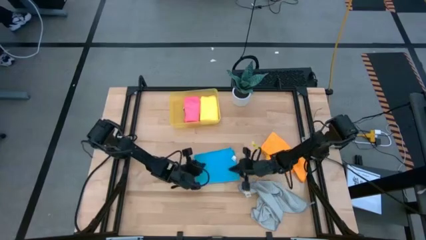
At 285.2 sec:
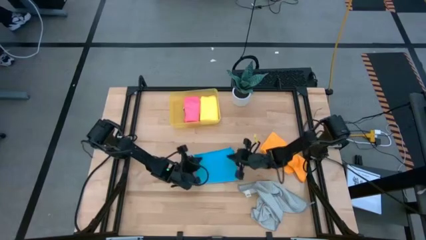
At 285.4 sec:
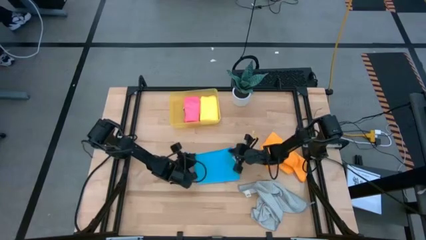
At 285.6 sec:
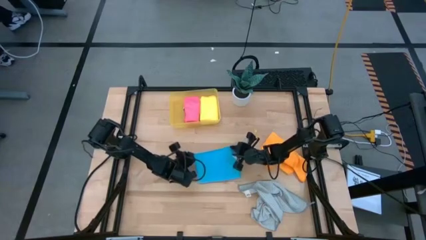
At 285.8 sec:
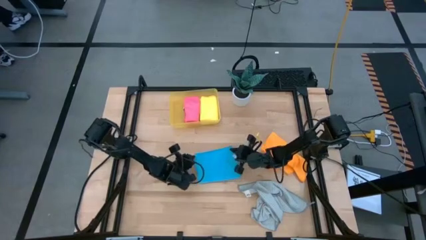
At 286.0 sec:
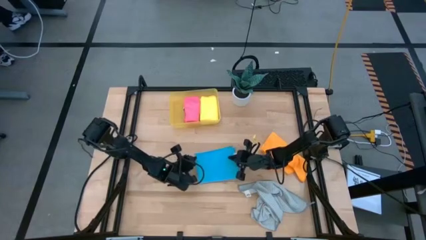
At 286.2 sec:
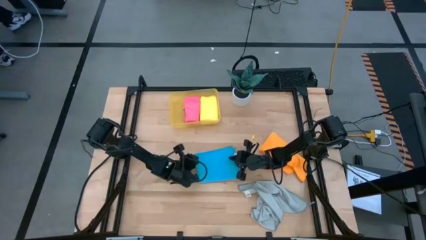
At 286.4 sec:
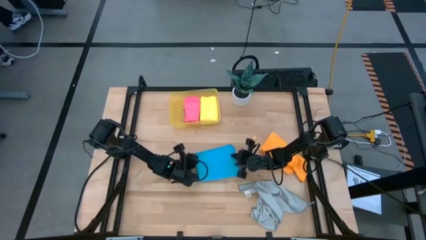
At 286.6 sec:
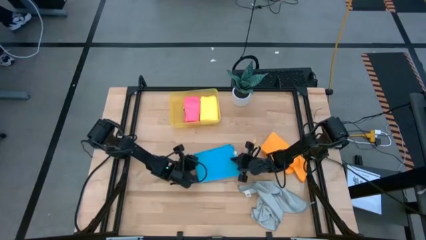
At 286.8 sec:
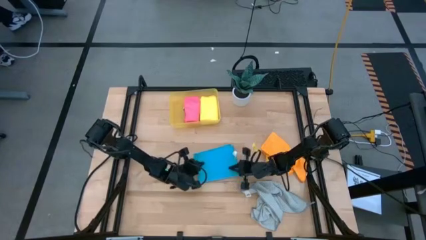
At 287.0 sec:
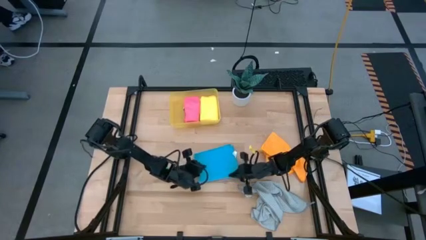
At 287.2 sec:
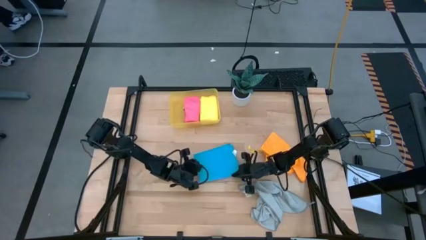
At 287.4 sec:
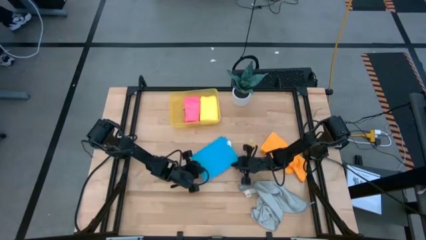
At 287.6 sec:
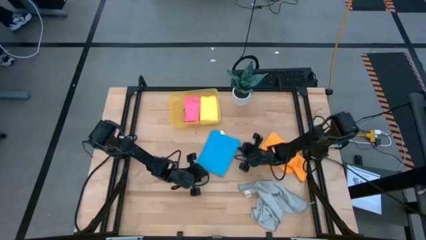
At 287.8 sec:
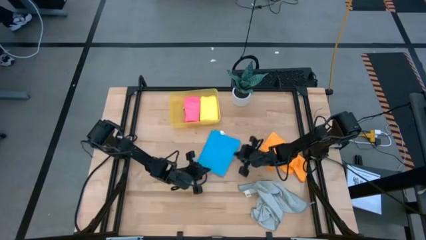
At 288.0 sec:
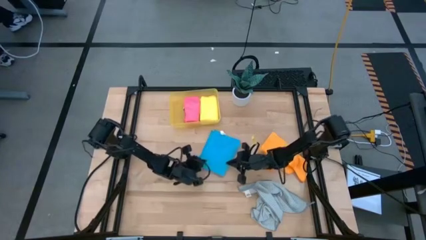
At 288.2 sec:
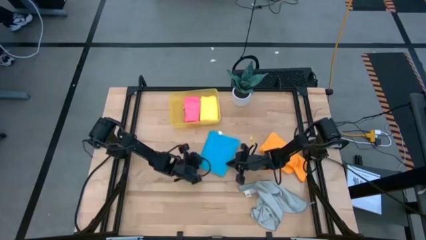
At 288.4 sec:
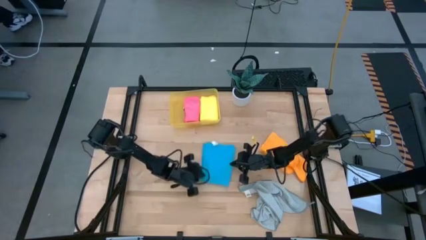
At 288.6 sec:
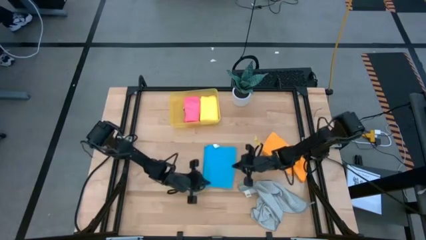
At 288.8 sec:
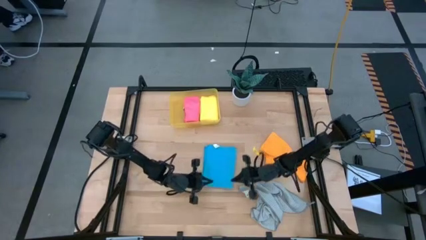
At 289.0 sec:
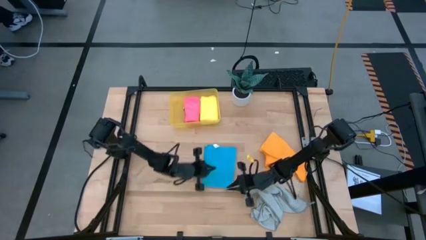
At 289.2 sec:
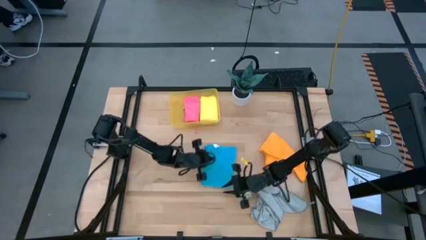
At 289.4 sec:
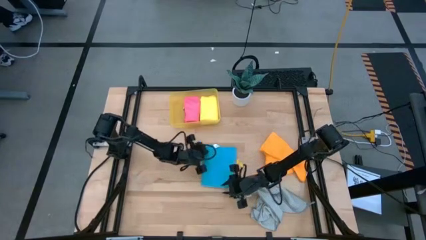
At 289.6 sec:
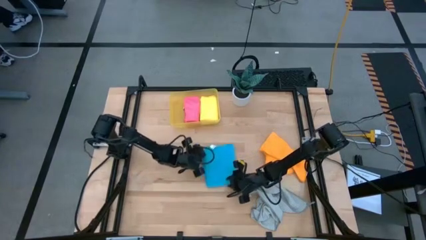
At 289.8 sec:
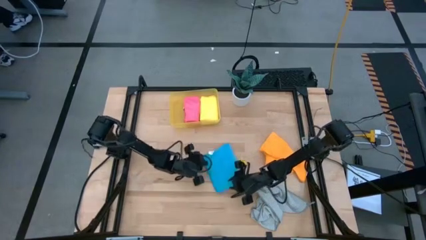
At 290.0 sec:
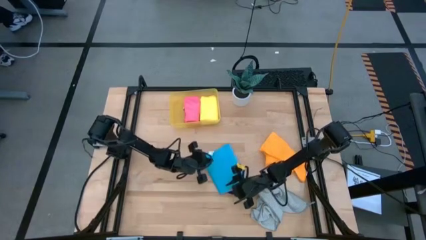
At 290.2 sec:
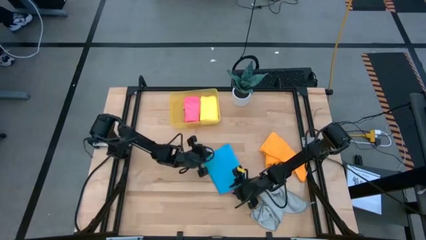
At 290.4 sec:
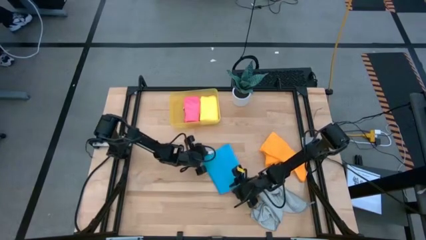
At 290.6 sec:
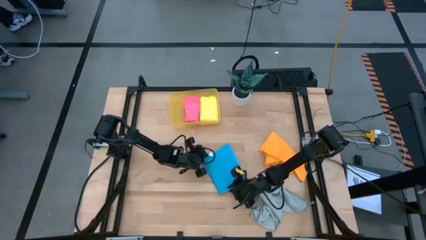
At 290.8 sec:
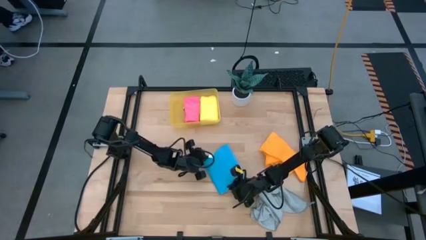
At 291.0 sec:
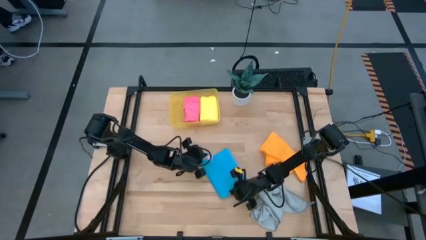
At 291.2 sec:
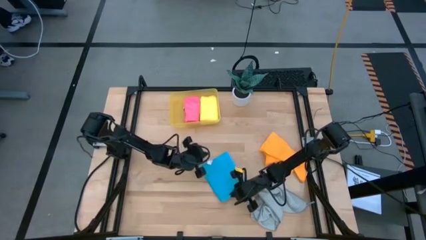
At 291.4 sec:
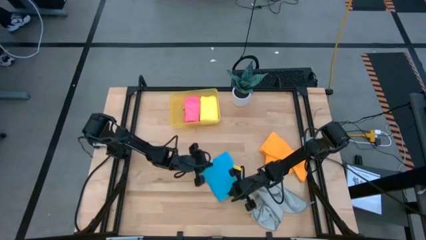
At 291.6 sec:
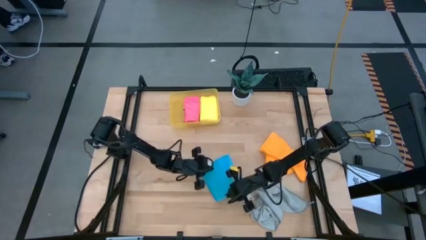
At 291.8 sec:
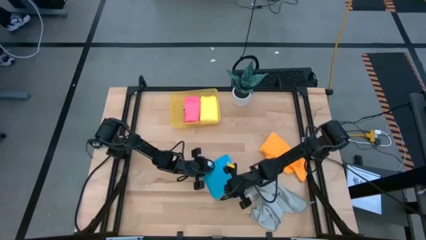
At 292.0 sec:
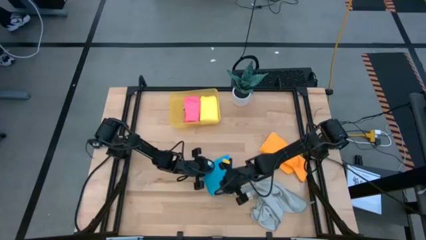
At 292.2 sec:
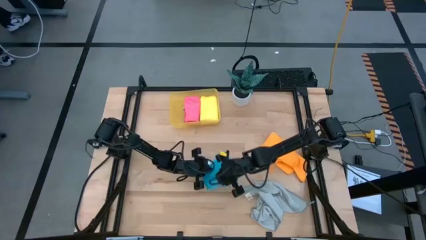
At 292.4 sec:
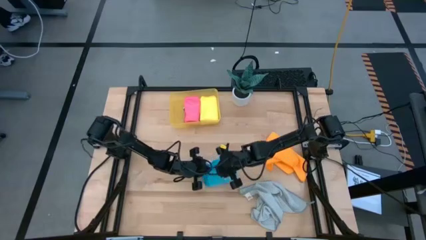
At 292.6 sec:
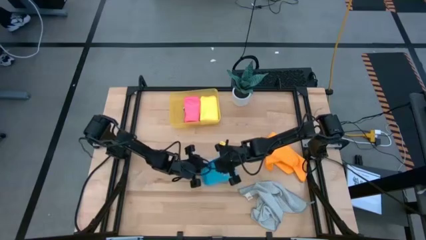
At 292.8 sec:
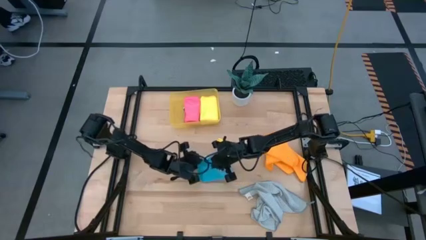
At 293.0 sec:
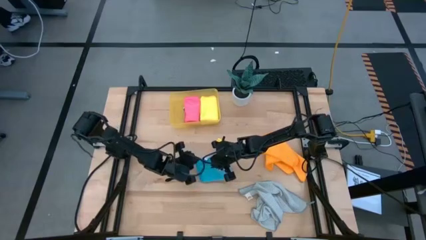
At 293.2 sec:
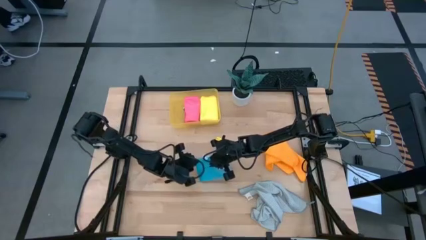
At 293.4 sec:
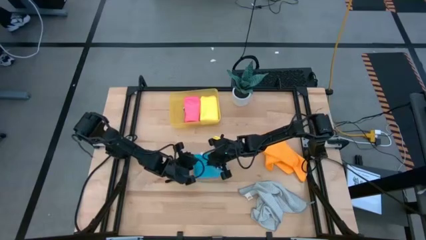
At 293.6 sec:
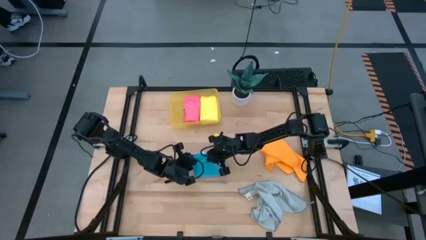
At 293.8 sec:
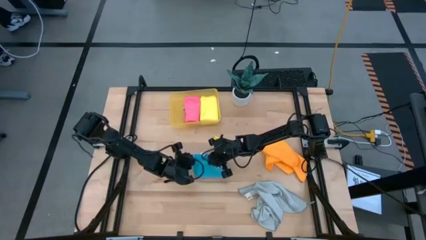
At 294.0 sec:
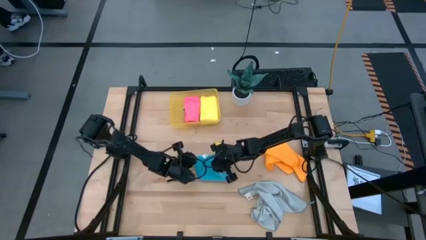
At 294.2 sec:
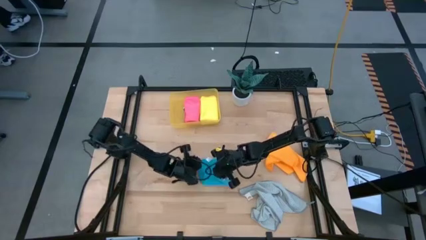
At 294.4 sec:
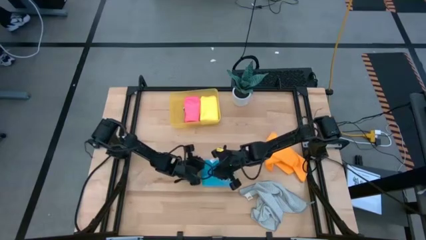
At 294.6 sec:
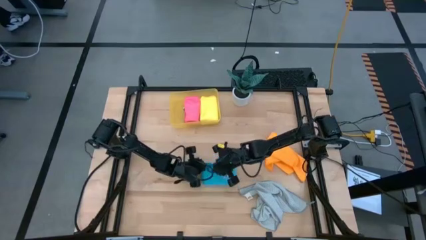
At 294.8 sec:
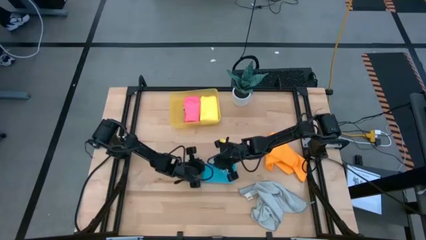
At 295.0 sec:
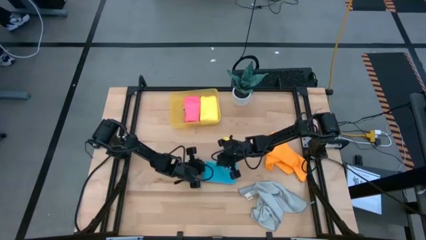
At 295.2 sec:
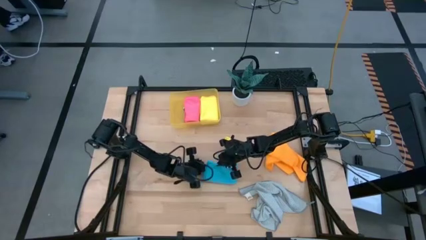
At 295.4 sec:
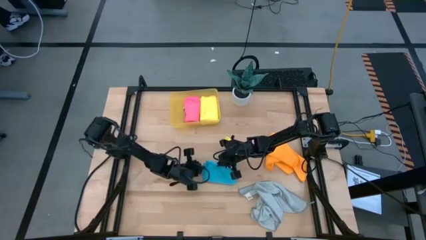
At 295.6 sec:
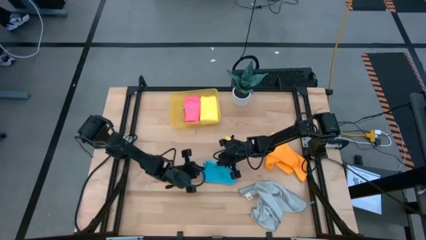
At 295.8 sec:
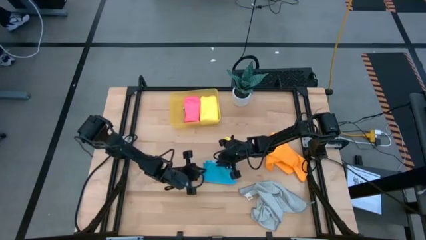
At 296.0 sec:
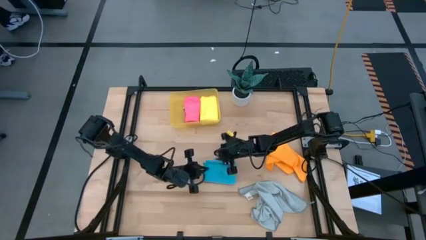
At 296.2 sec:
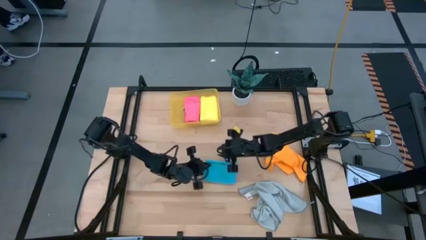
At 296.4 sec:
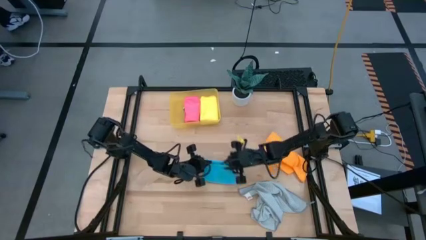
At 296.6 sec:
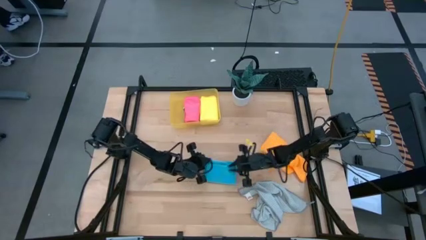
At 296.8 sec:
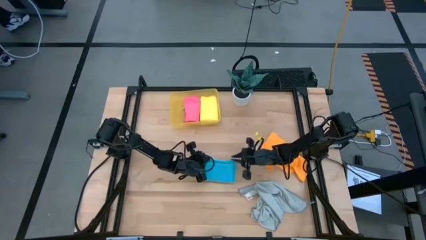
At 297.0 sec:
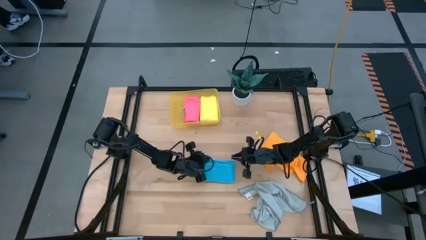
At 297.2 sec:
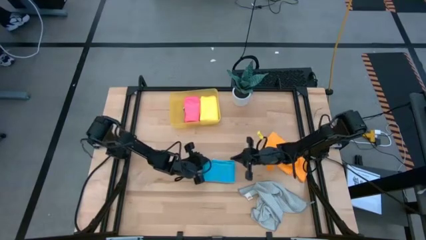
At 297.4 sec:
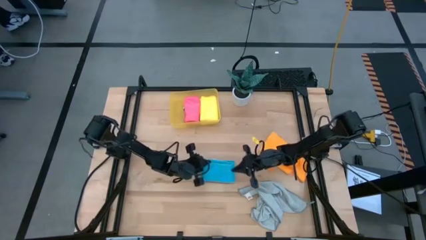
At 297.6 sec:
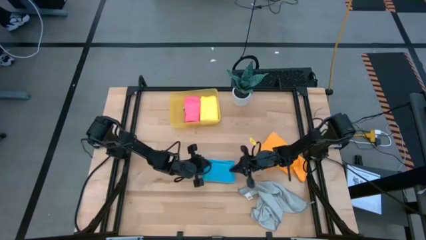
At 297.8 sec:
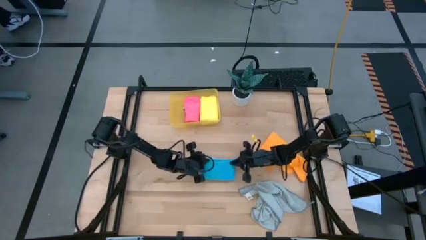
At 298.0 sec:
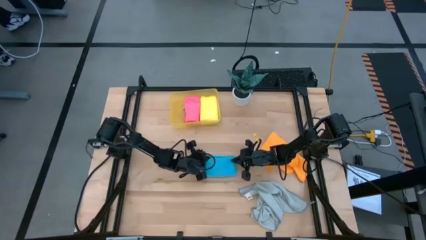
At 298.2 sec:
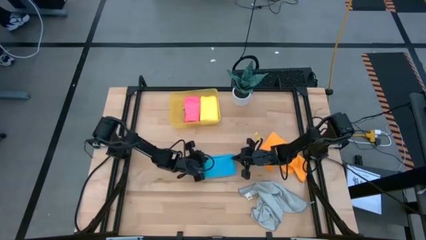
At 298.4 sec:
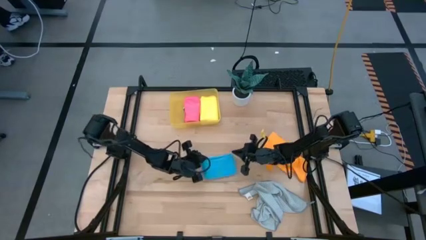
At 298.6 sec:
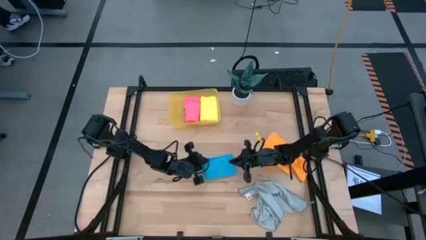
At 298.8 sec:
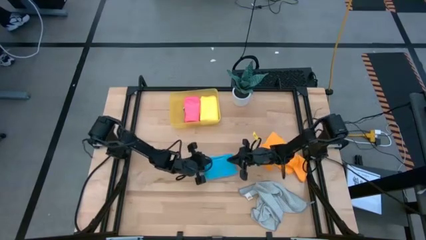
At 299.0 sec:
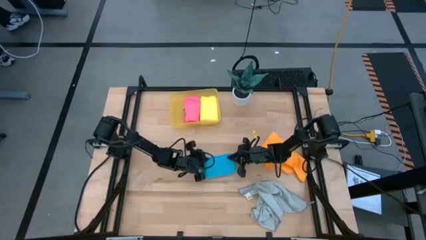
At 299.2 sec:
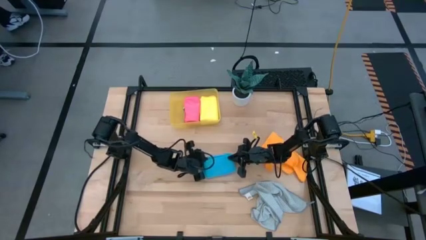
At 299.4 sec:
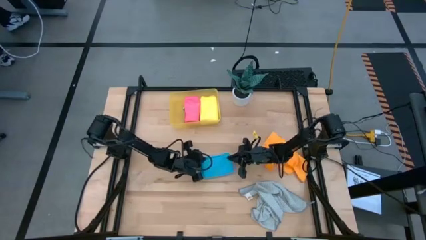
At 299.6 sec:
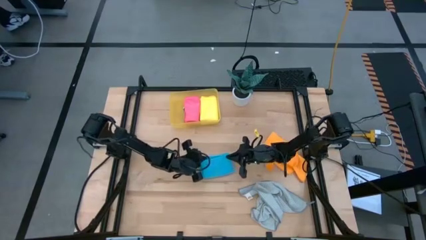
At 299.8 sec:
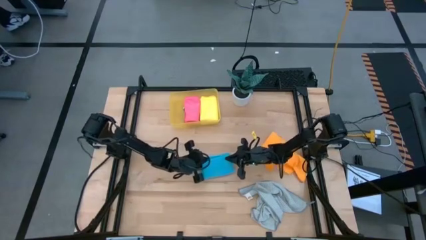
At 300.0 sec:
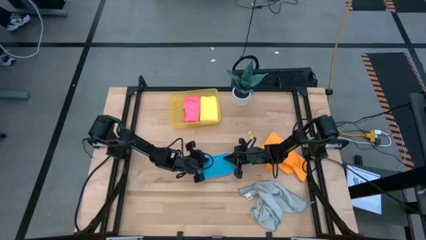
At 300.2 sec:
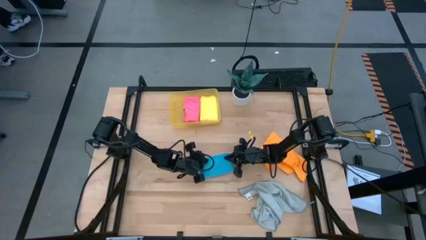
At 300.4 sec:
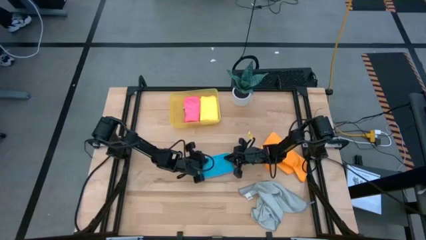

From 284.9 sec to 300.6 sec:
Task: Fold microfiber towels
Fold the blue microfiber cloth

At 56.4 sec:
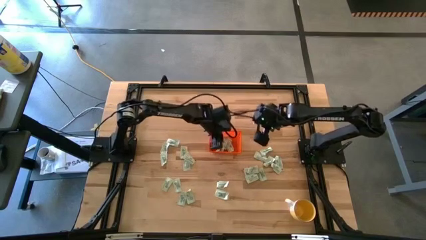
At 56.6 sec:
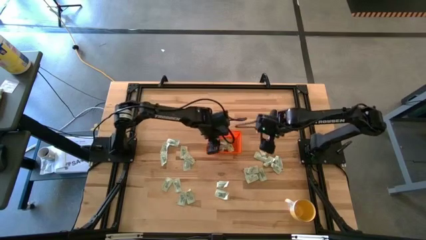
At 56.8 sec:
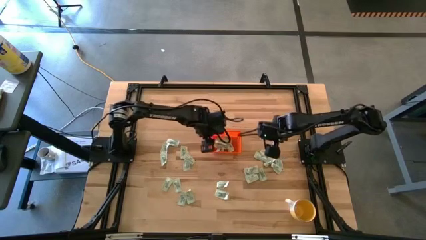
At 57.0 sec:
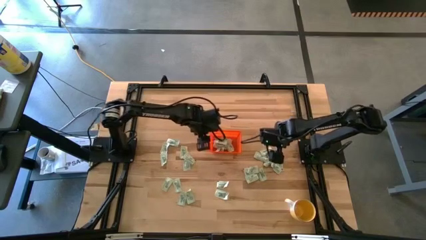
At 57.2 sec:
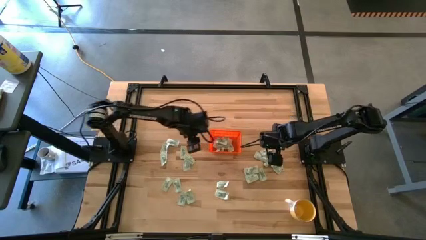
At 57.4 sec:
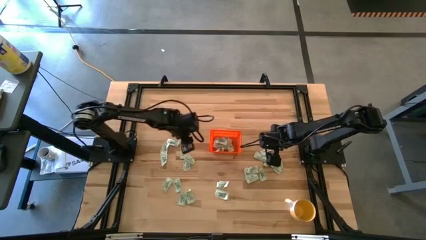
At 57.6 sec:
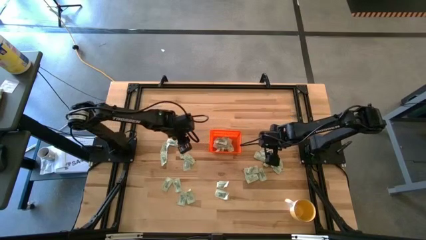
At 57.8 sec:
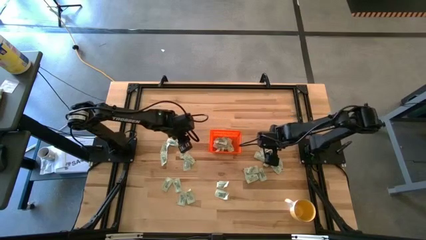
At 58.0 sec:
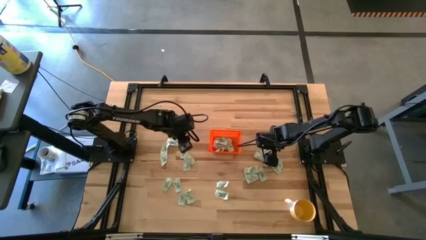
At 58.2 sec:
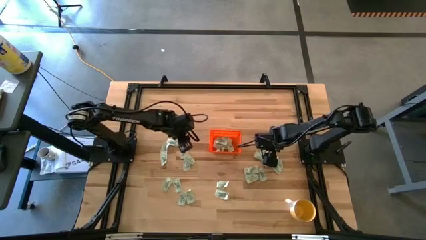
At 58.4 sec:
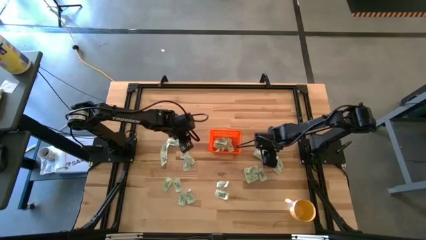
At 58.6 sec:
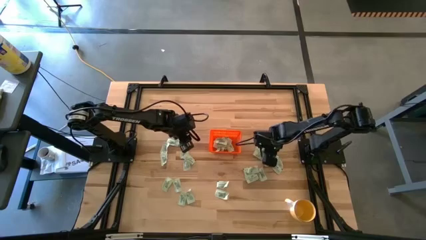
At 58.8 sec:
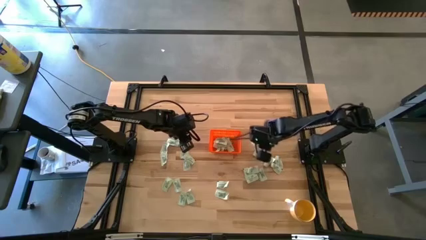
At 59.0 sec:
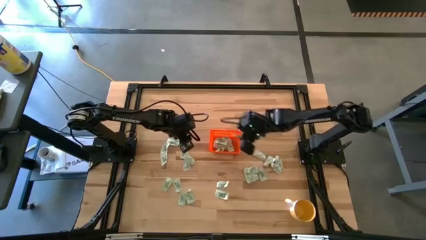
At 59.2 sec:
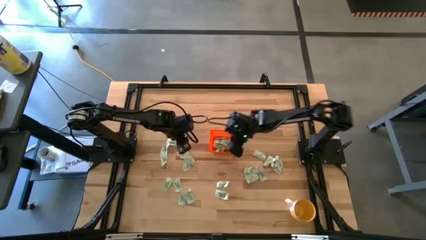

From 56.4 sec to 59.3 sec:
Task: Pick and place Stevia / Truvia into bins
Put the light green stevia packet into the orange basket
